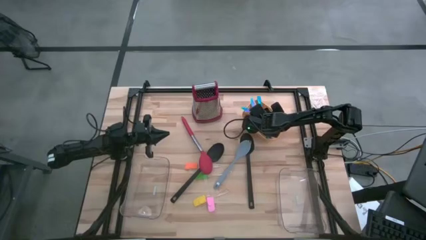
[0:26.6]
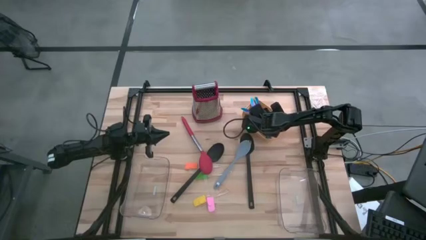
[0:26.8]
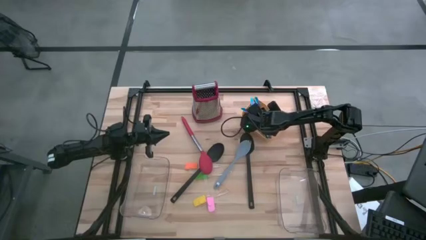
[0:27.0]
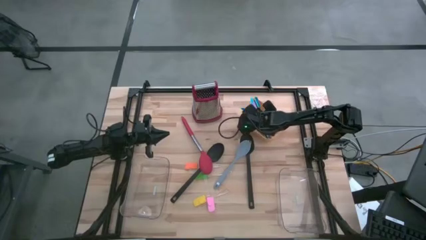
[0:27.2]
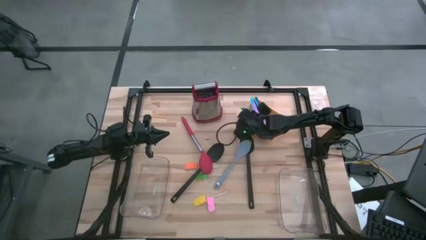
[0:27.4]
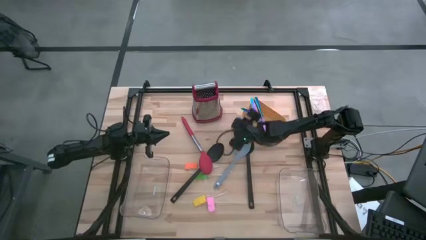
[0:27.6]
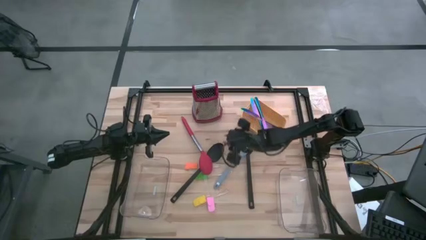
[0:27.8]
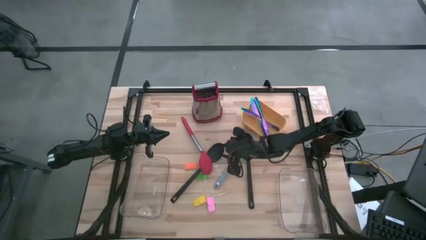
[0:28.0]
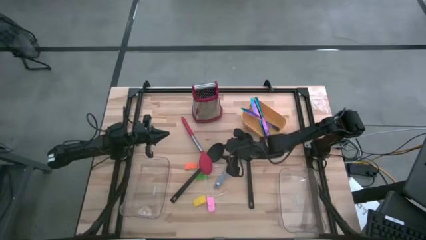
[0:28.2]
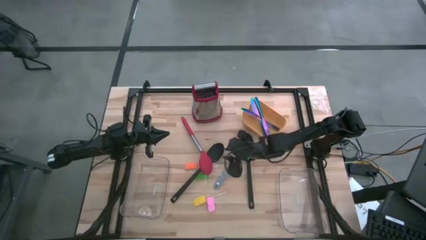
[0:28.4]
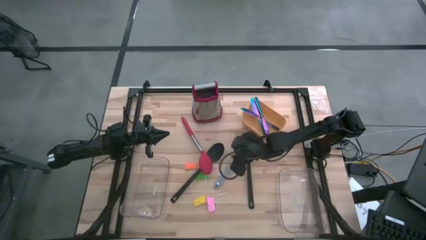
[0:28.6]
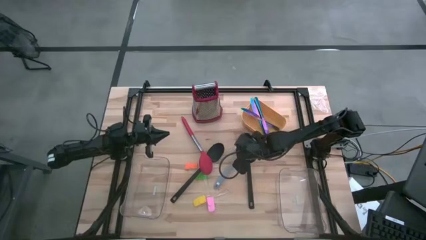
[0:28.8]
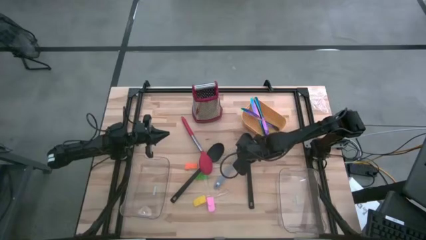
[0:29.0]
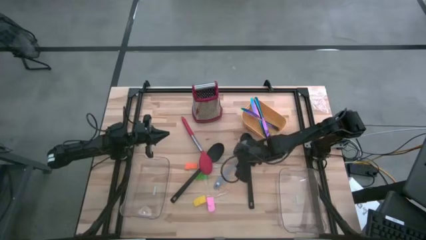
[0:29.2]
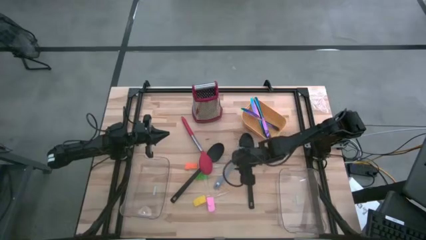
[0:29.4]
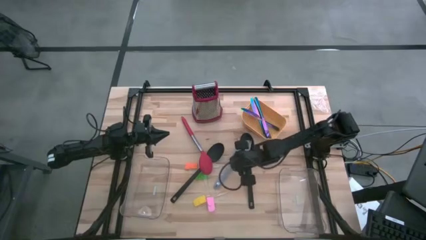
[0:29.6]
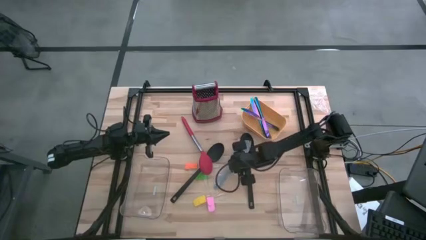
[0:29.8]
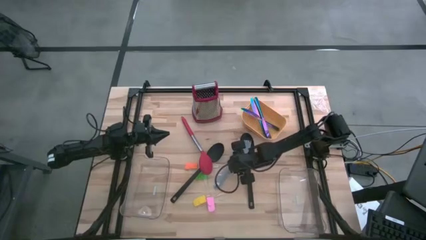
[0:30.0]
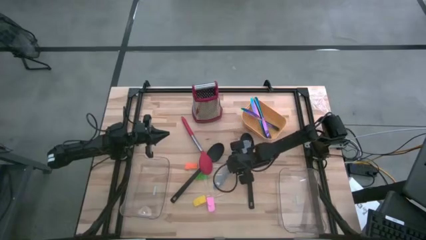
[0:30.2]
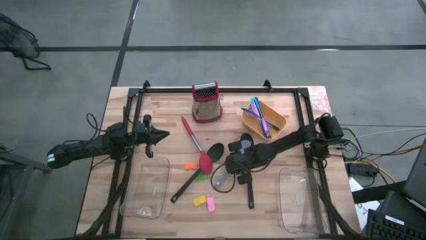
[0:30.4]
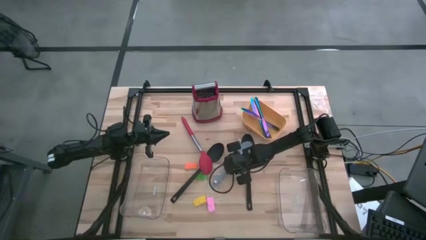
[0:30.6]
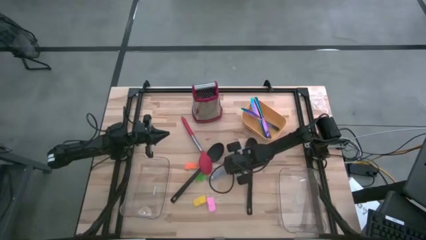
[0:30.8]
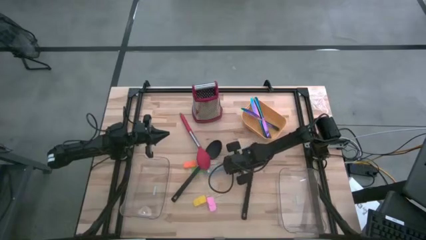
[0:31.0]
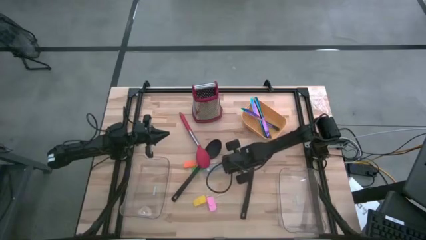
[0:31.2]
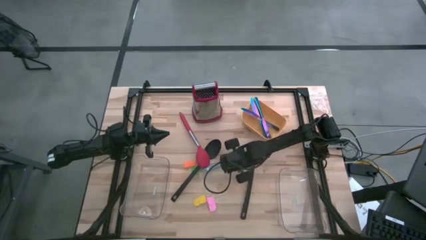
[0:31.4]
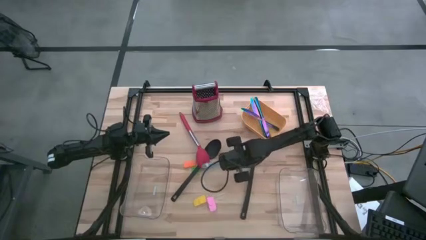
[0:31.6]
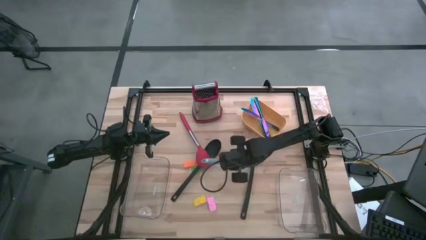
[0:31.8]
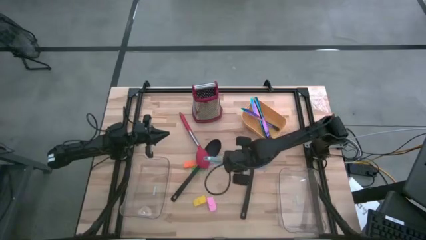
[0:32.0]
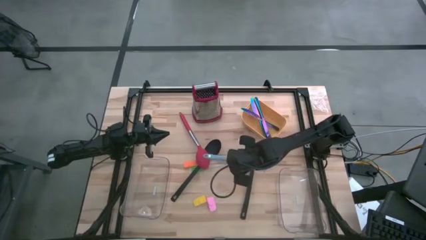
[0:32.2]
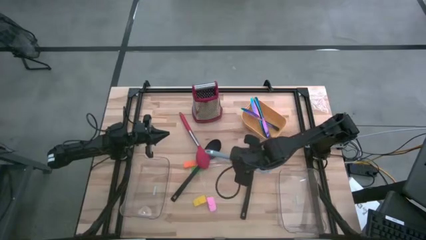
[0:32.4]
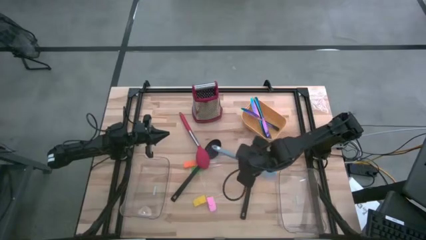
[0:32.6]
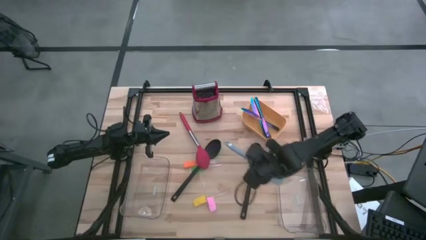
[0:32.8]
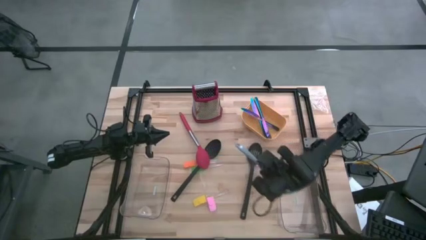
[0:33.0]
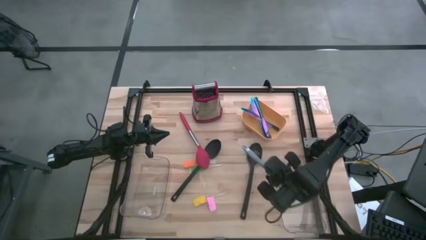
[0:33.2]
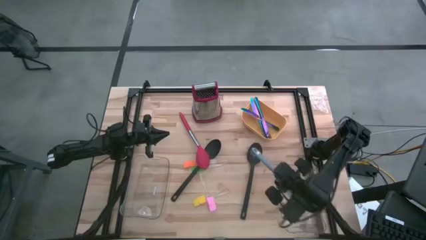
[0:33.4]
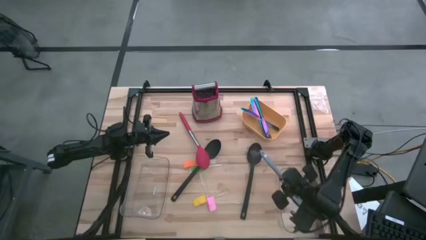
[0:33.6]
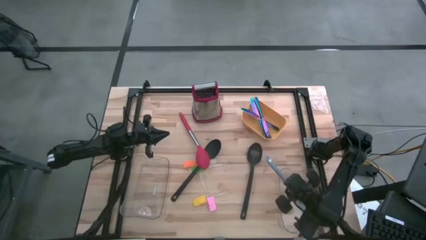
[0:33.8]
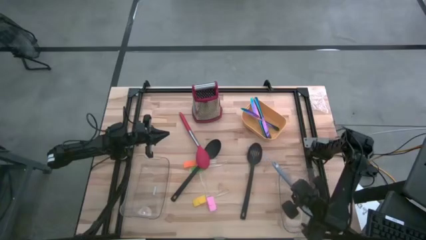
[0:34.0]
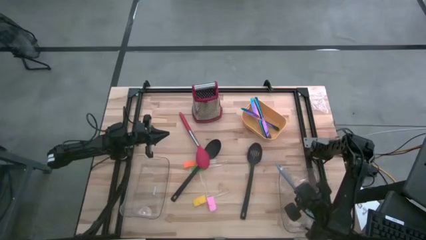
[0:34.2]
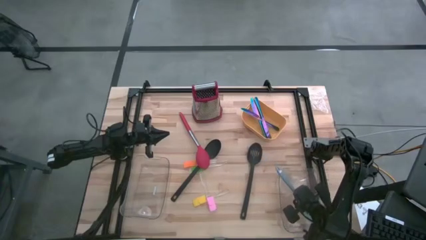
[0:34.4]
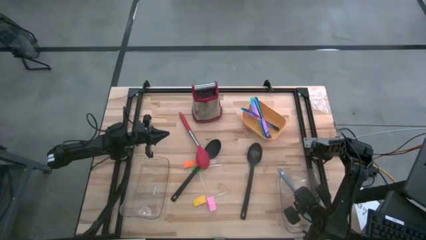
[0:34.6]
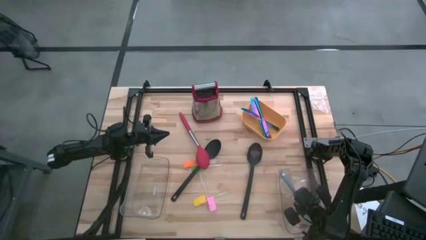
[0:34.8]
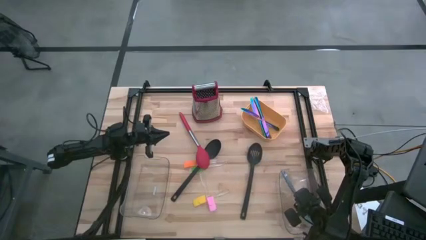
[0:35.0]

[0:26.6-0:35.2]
Task: Pick & Place Kitchen Items
Put the blue slotted spoon into the right transparent bin

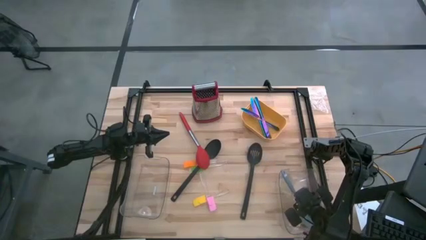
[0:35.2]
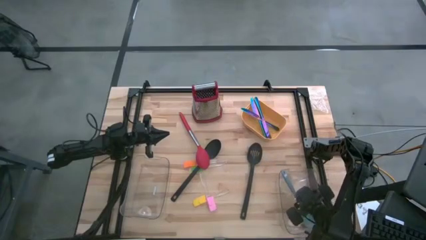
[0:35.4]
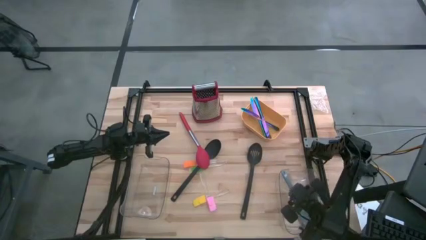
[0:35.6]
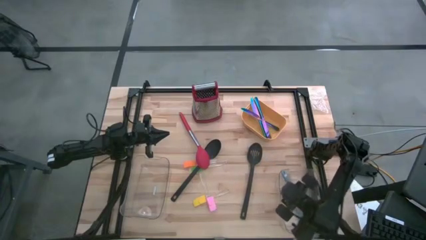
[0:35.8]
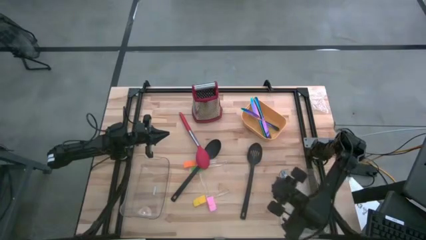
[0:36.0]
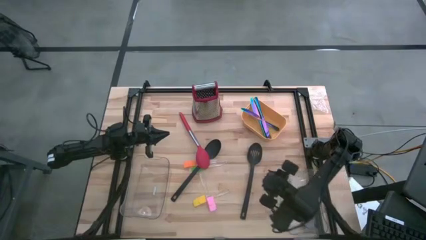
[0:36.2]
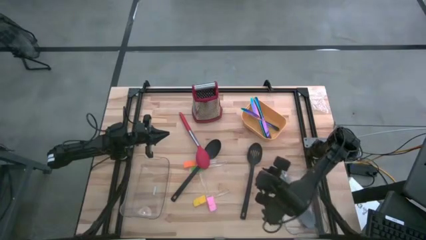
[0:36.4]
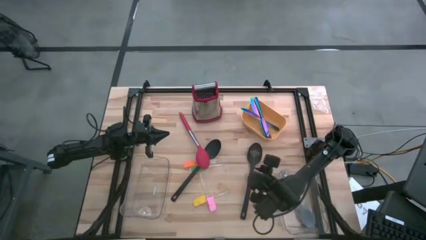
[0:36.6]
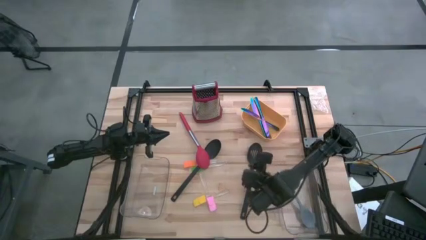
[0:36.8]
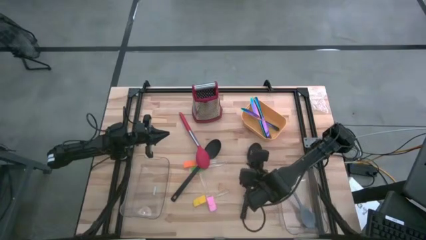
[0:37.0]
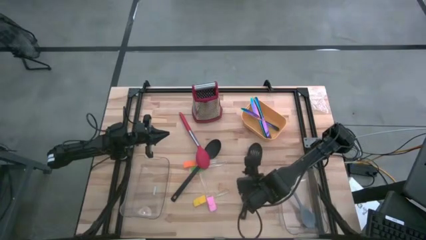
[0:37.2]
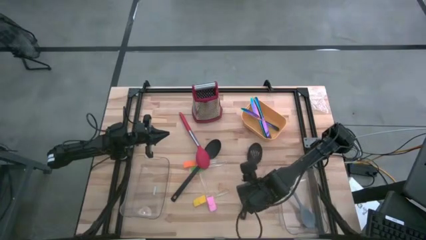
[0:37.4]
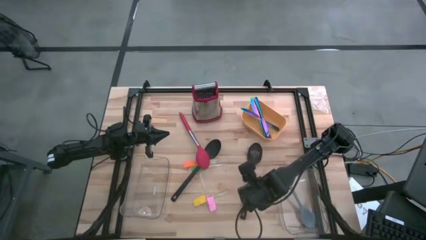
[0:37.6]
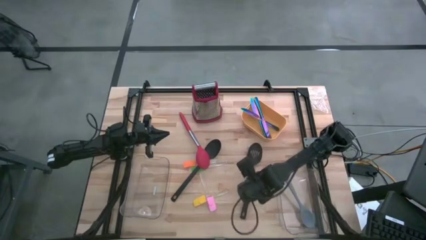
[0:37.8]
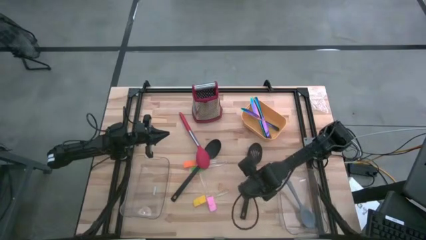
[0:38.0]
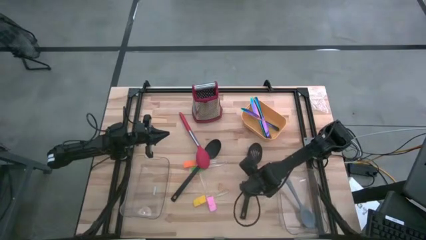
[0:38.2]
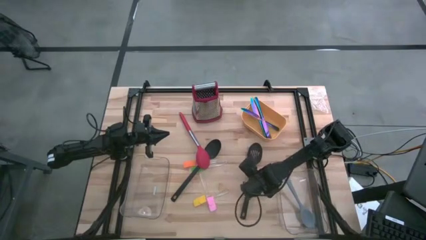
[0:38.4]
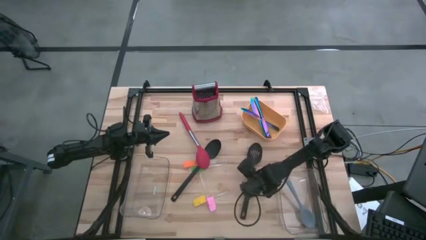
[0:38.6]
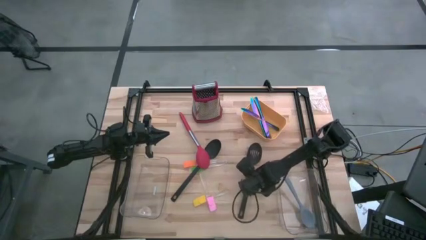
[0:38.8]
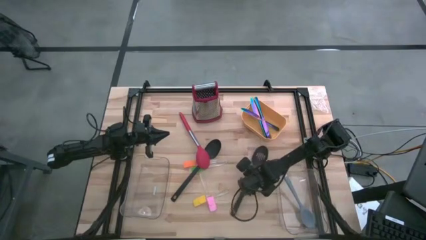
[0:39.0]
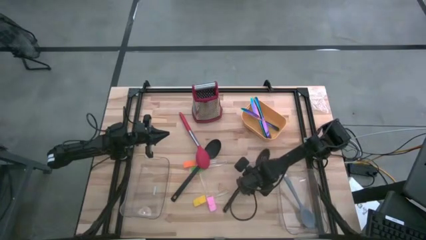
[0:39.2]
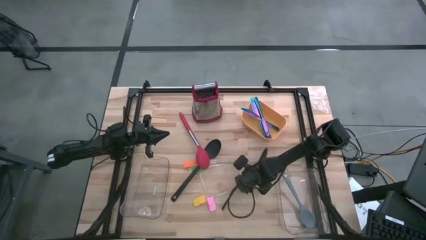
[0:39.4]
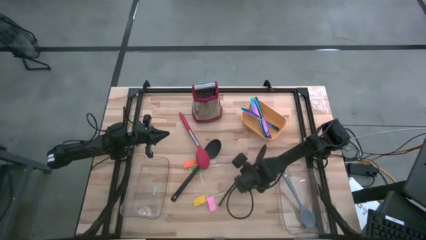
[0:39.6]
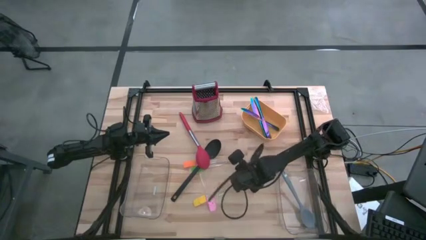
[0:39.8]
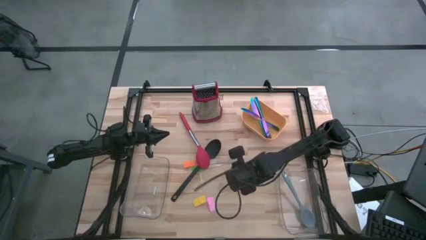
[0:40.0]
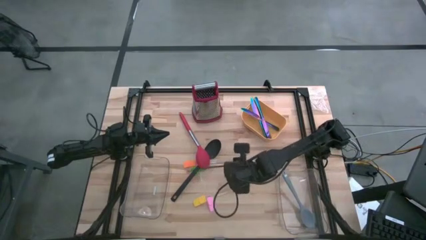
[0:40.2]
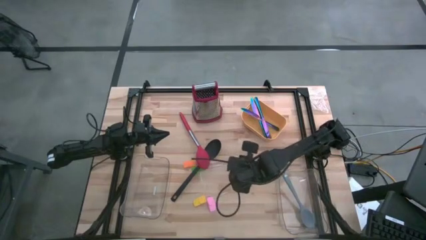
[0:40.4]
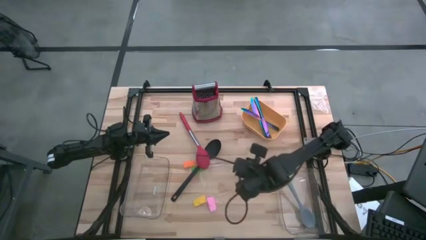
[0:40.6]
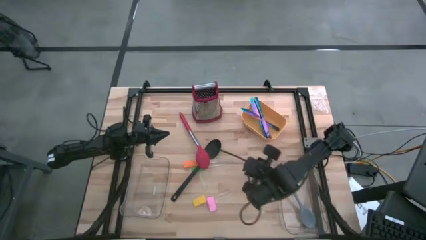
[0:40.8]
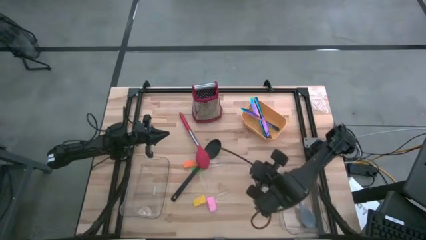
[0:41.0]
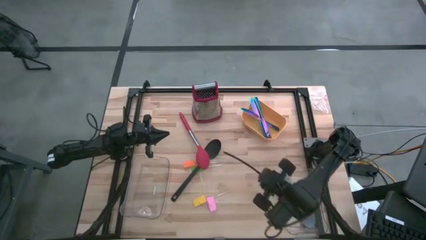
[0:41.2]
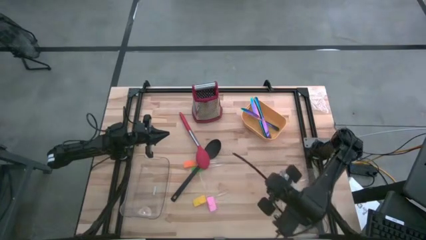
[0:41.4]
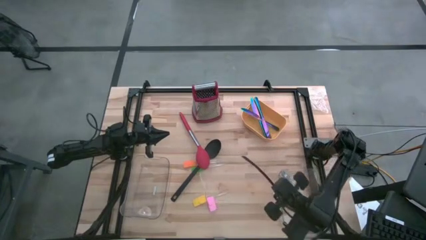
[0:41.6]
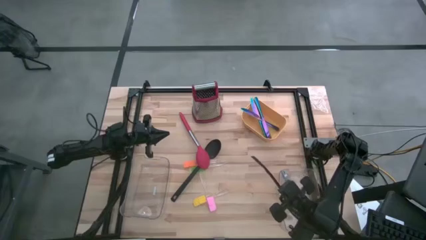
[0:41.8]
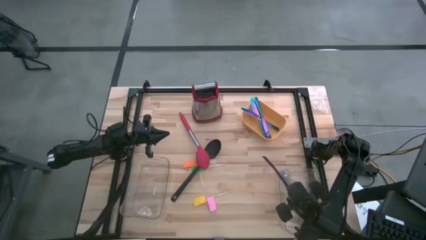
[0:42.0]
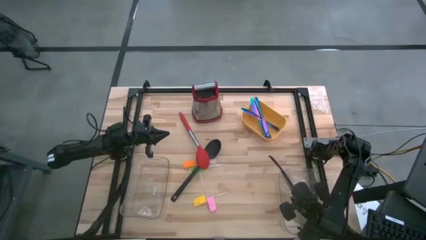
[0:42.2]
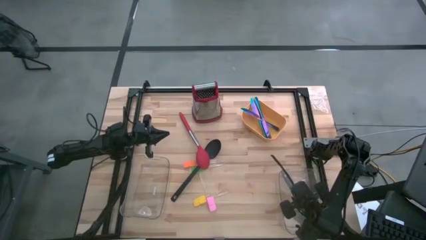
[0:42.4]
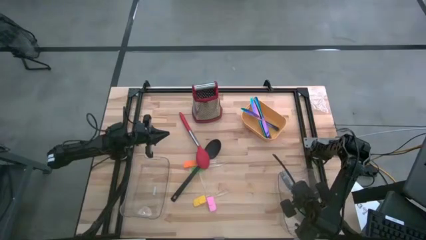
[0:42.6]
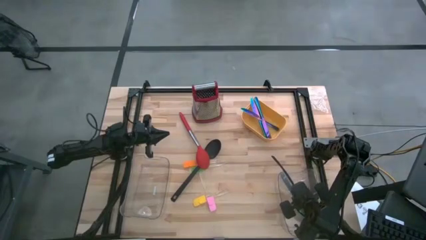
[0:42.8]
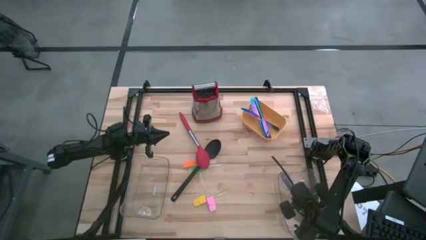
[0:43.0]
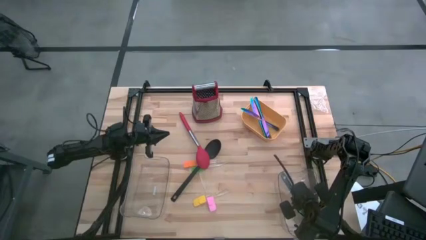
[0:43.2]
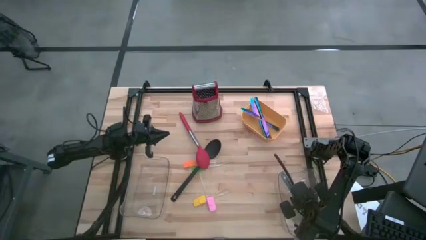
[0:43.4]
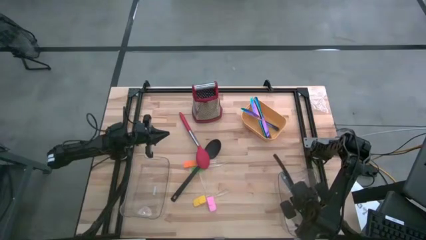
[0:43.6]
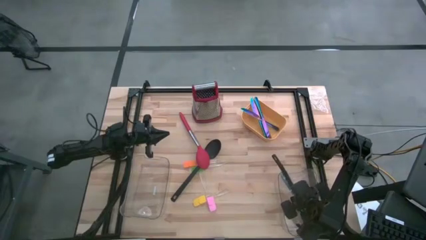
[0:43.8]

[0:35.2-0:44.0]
Put the right black slotted spoon into the right transparent bin
